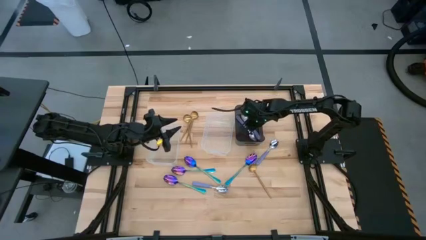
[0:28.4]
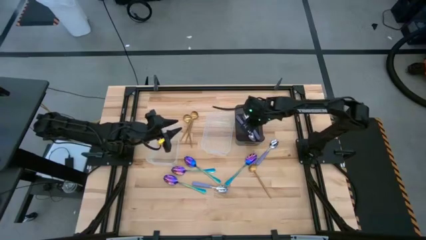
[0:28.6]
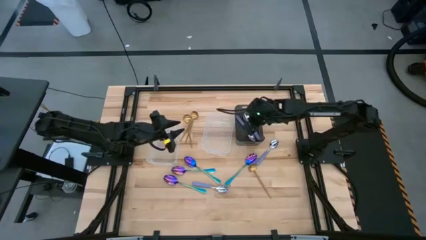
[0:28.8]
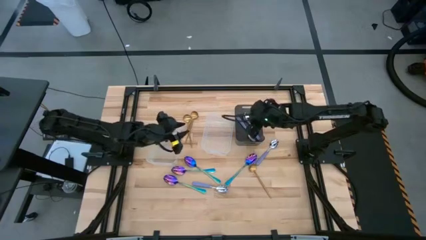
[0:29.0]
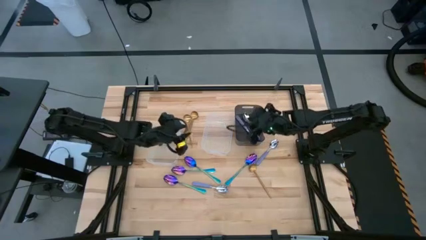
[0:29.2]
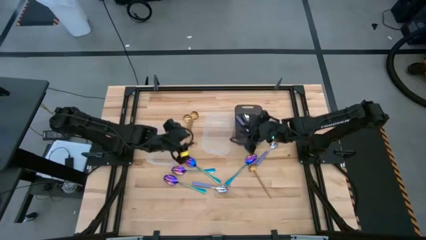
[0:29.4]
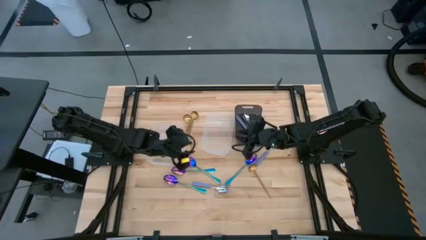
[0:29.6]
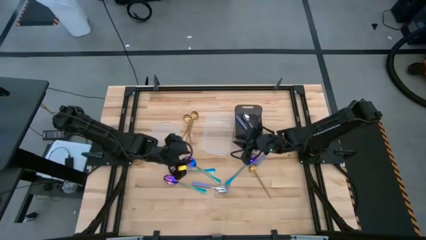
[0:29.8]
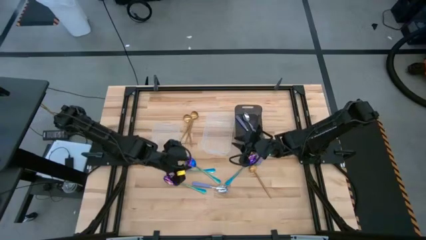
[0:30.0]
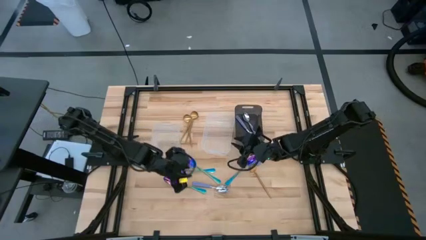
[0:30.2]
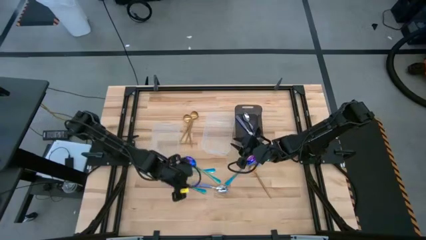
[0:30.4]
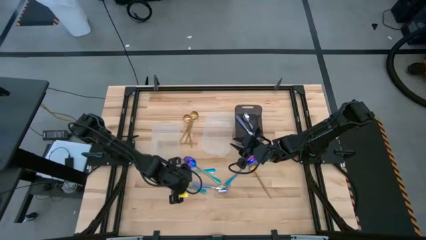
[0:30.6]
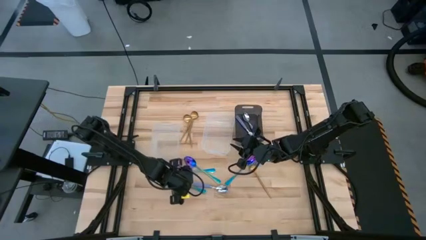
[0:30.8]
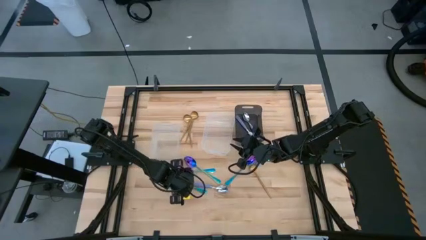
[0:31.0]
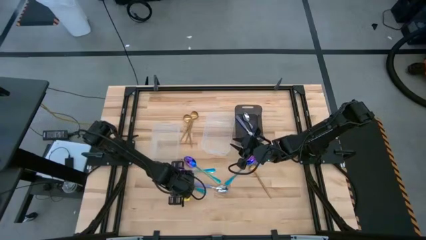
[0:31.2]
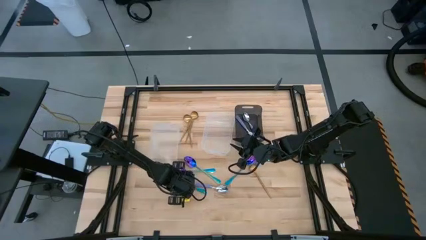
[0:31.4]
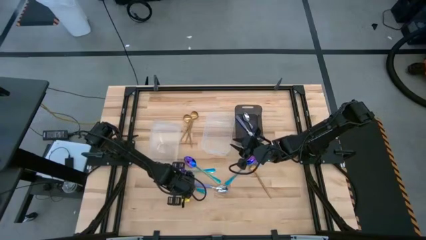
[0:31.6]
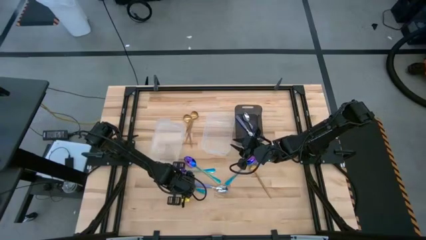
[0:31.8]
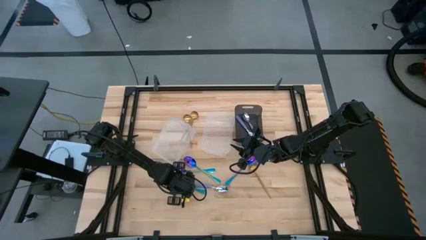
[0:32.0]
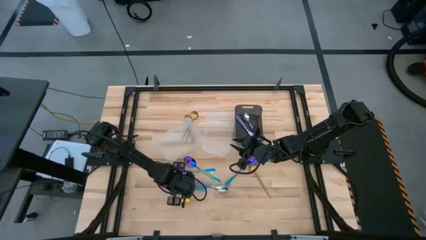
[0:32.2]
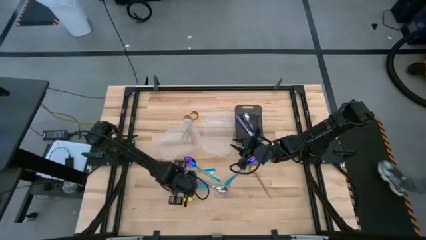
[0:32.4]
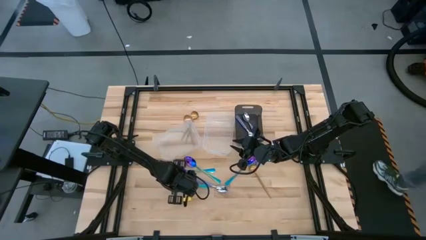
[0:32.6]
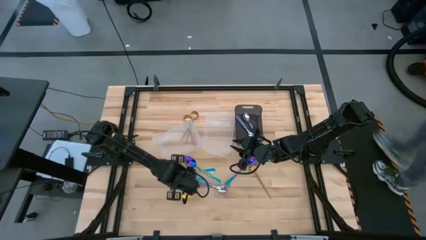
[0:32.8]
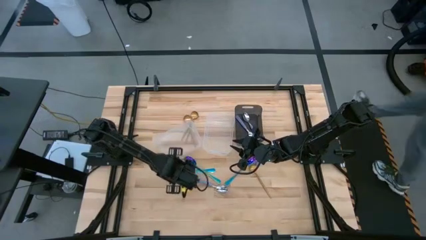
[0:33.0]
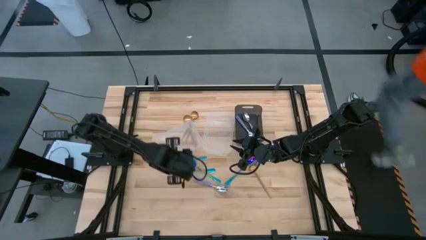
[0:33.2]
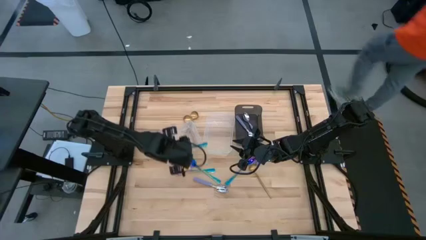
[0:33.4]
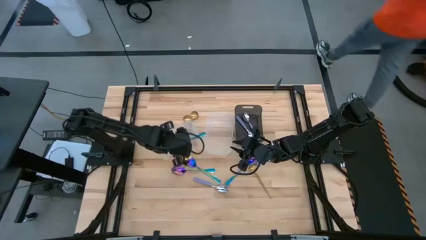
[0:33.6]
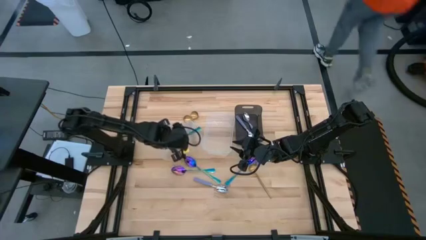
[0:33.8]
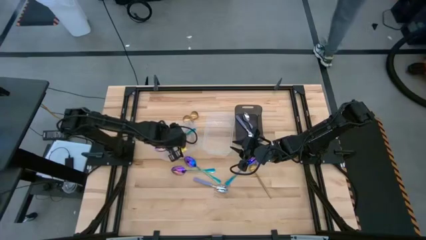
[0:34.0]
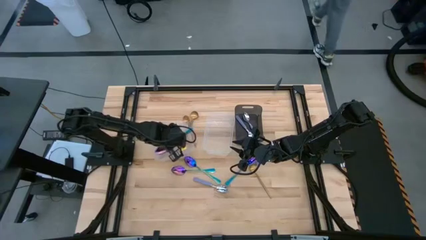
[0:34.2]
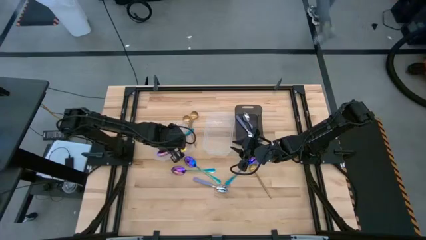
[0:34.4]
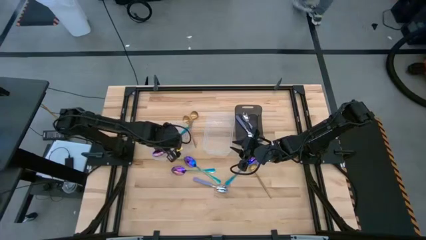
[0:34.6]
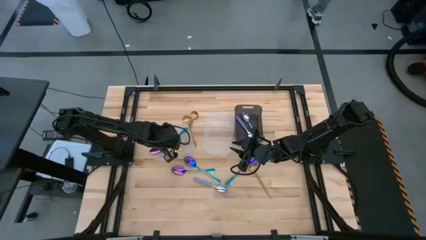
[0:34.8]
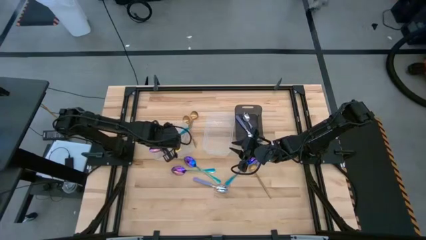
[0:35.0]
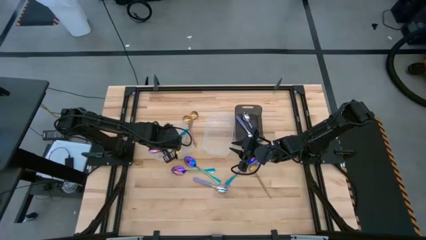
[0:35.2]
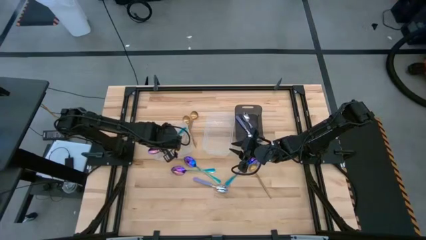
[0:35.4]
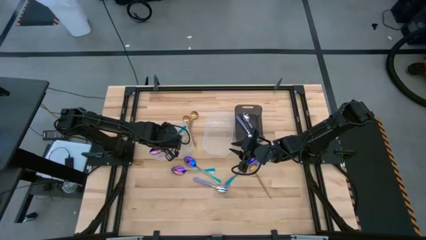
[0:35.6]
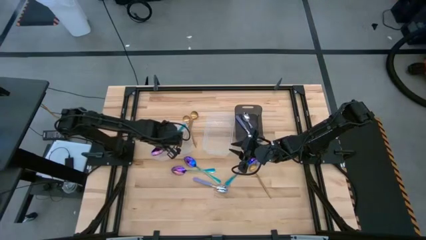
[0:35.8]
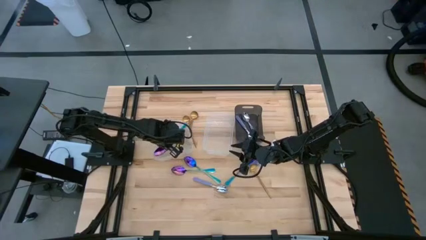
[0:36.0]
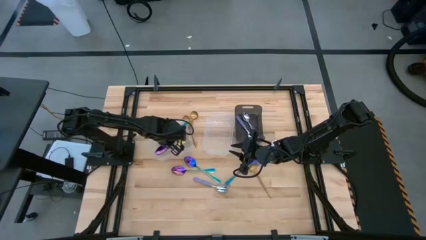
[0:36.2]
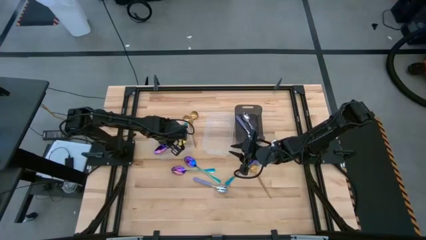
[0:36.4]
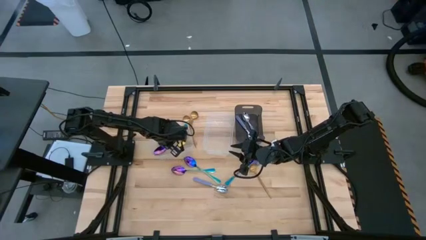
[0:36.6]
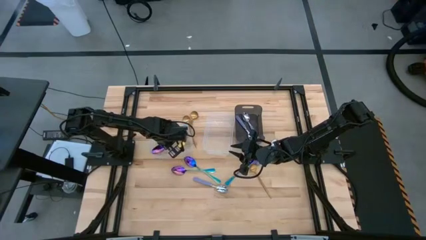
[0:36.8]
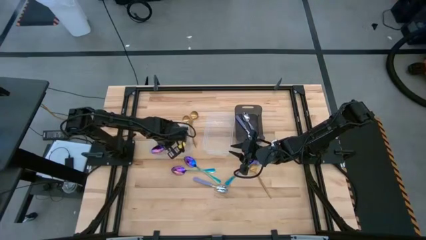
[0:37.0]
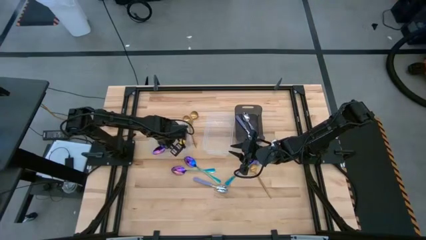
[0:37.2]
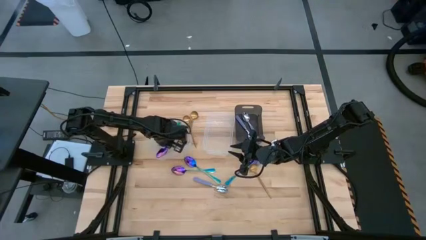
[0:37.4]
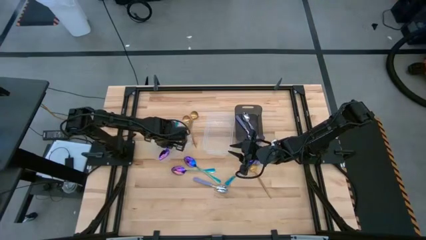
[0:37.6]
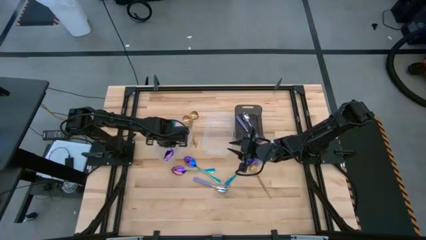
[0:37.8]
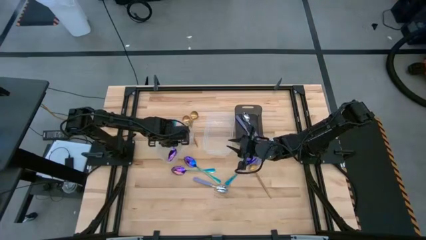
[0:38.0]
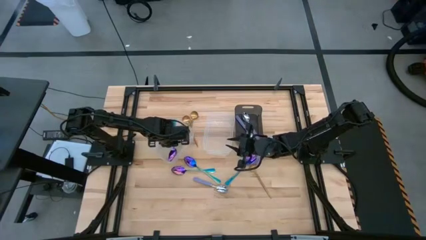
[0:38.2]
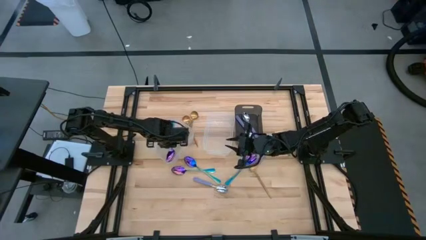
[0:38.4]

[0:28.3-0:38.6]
Task: Sort silverware by color (type)
Put the blue spoon into the left transparent bin

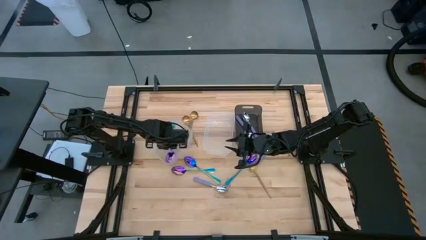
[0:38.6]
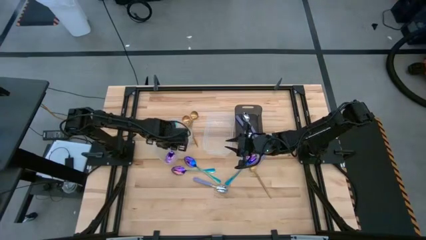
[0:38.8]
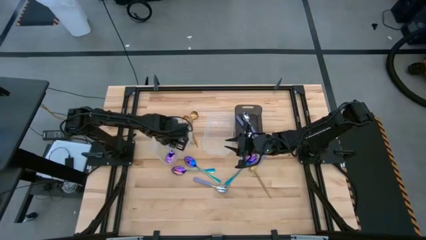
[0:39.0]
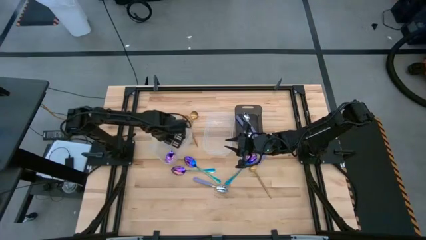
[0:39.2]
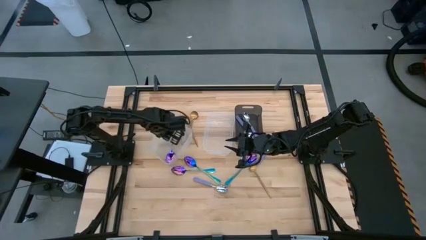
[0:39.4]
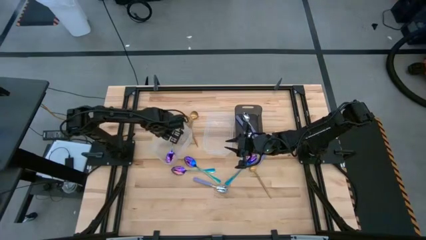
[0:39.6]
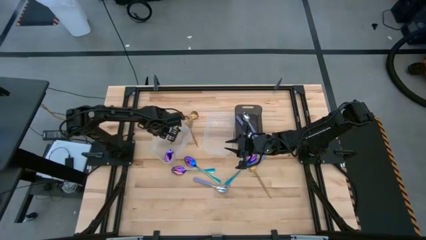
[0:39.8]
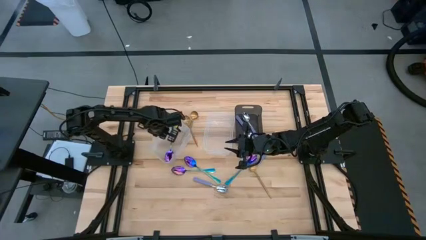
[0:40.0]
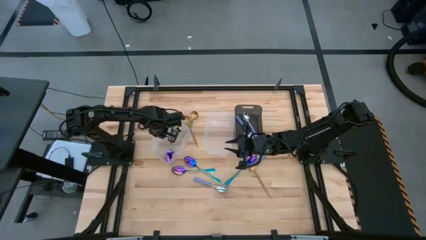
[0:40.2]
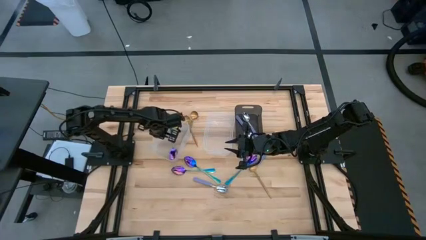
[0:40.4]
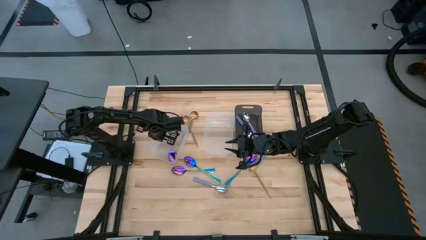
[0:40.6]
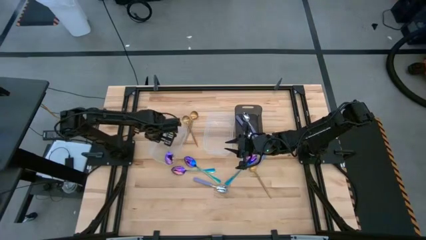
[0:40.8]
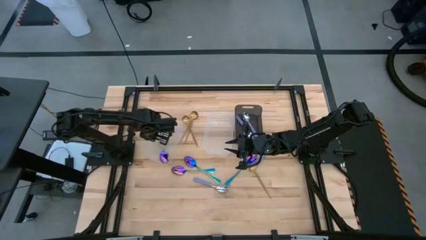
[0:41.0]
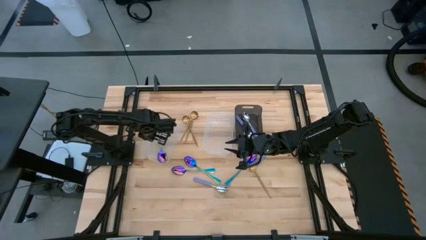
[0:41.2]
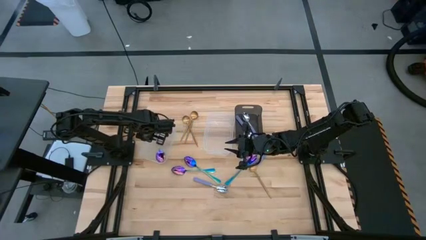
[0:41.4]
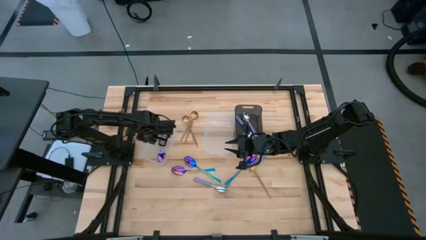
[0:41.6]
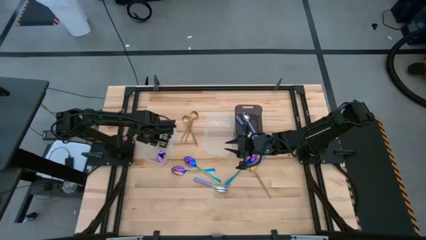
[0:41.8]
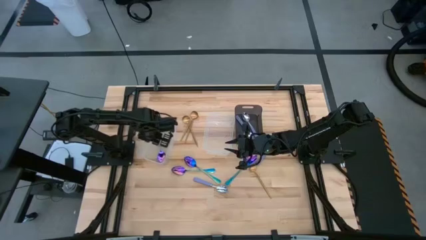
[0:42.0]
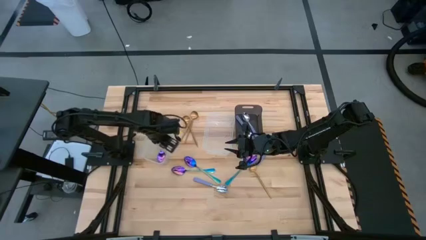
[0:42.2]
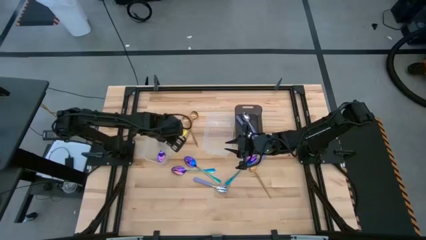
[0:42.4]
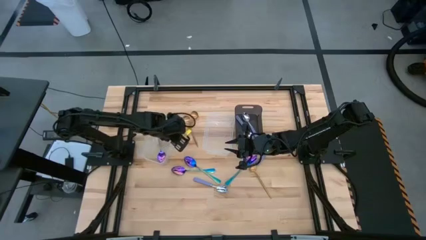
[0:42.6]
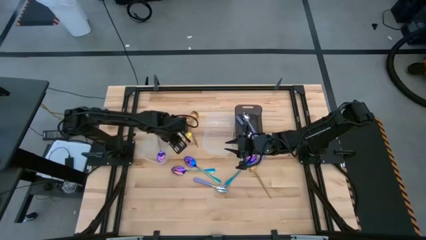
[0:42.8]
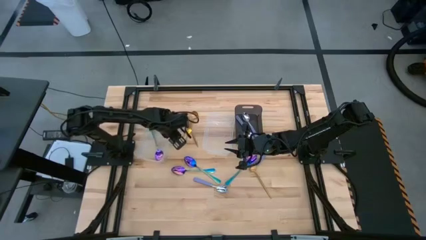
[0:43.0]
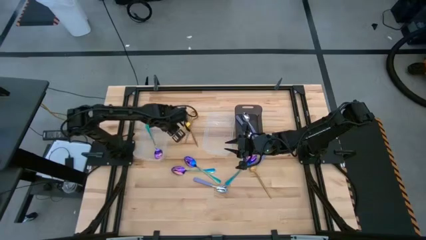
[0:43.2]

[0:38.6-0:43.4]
Adjust the left transparent bin

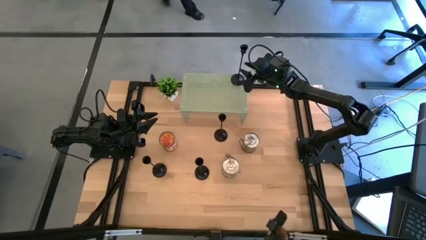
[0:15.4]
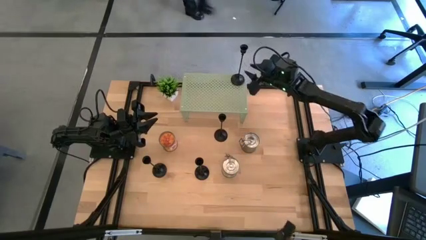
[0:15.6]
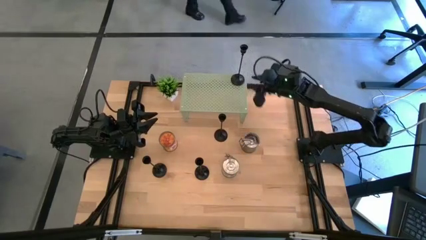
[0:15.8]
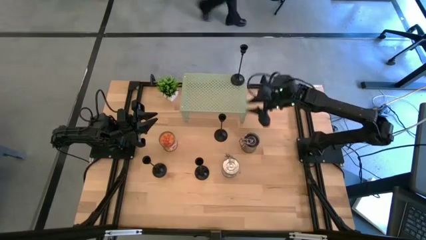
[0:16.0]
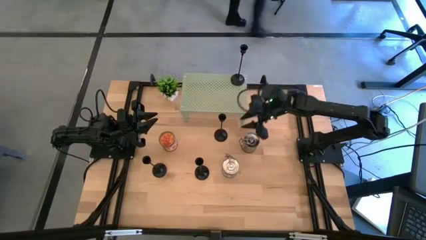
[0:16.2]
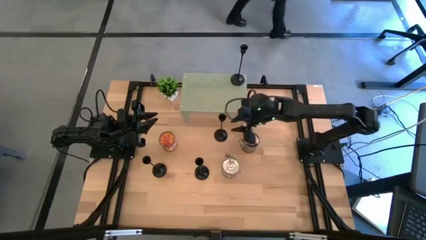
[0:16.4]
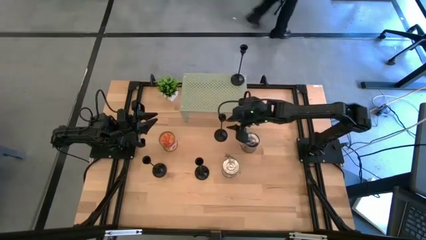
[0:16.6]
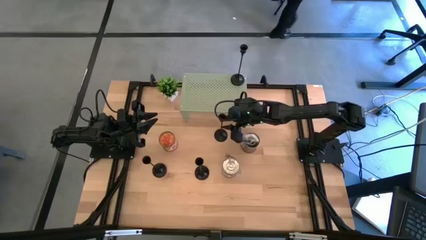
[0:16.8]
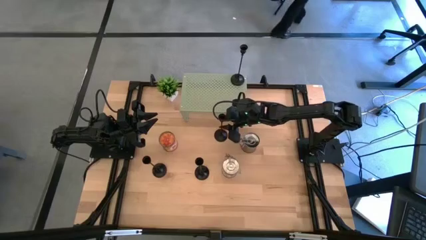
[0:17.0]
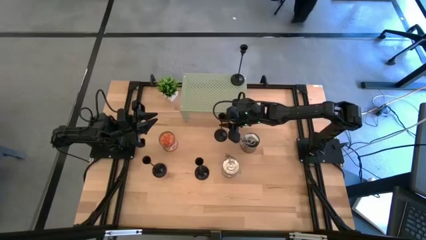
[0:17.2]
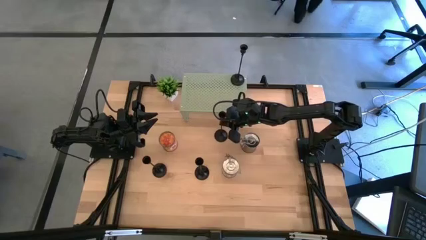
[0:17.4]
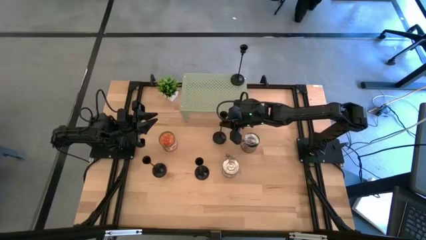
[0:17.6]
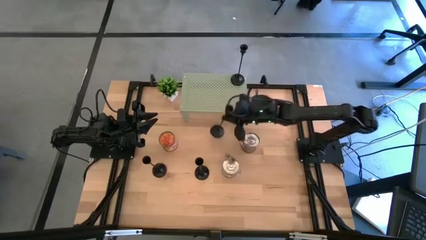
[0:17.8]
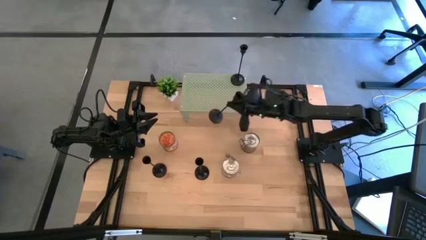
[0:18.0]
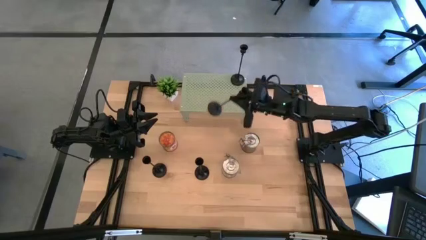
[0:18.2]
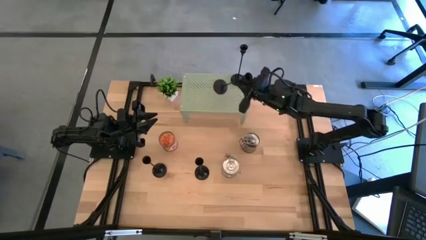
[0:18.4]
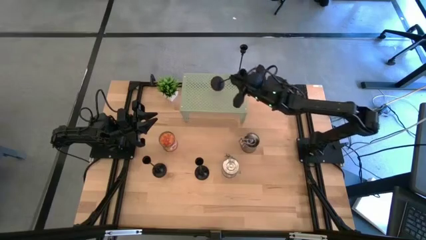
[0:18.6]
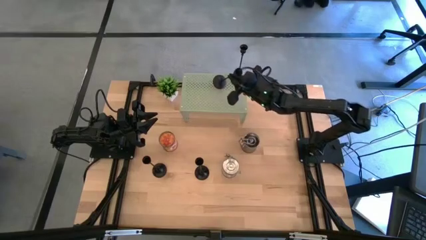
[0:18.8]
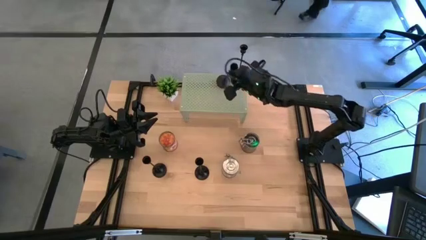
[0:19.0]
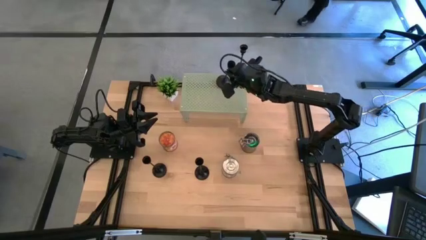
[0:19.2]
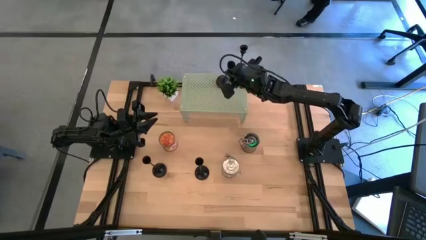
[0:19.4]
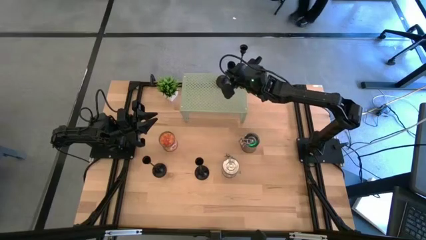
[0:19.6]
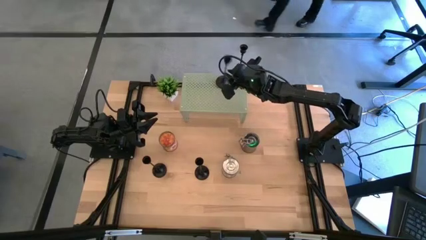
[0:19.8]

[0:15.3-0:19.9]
Task: Pick & Place candle stick holders
Put the black candle holder on the shelf aligned with the other black candle holder
